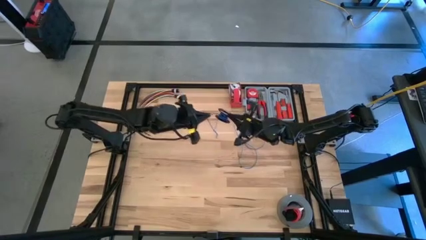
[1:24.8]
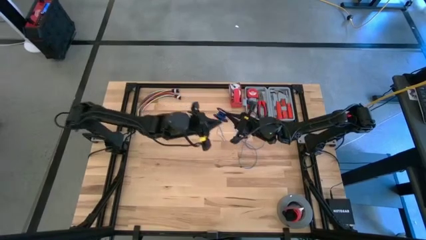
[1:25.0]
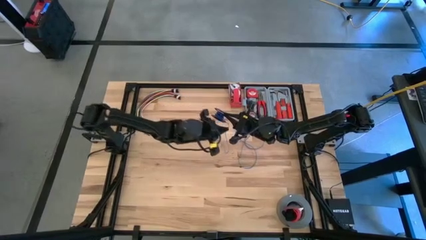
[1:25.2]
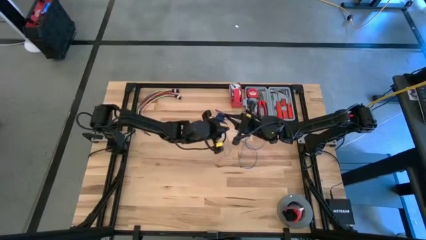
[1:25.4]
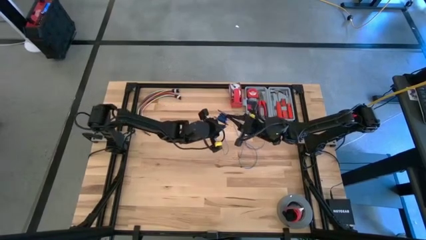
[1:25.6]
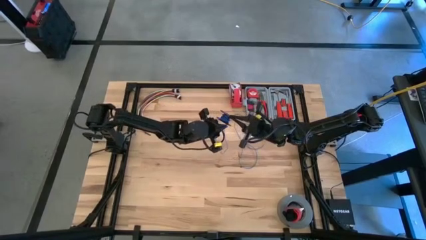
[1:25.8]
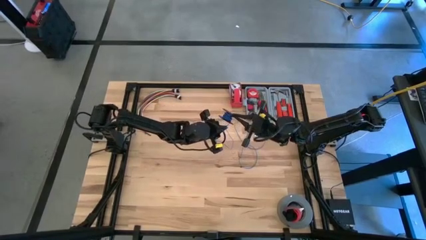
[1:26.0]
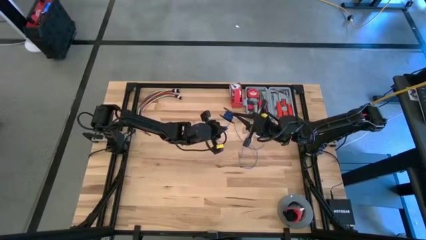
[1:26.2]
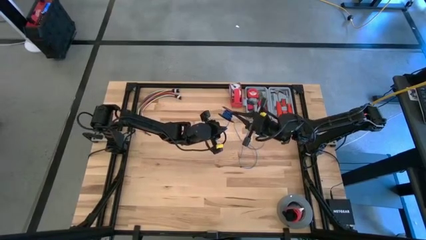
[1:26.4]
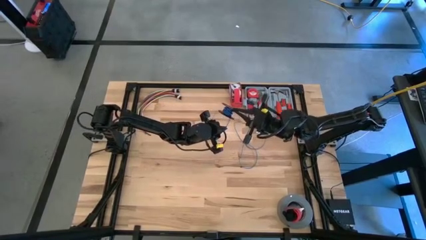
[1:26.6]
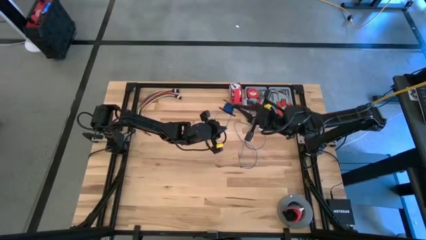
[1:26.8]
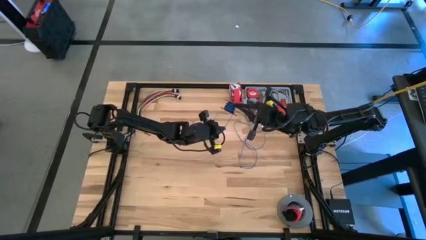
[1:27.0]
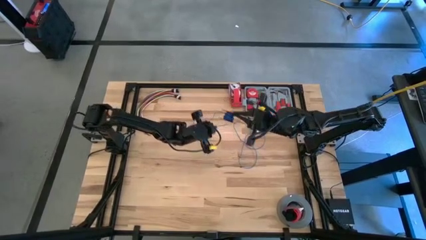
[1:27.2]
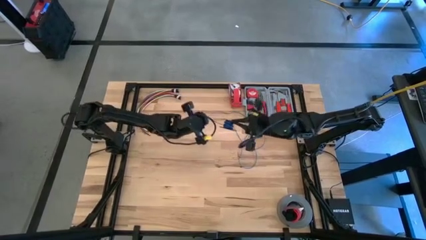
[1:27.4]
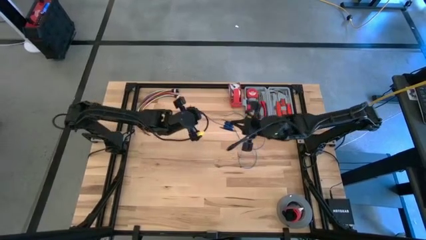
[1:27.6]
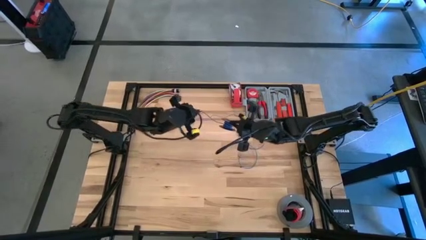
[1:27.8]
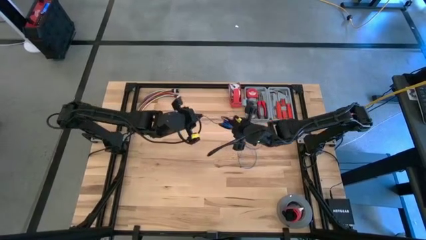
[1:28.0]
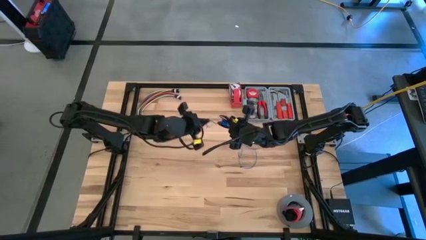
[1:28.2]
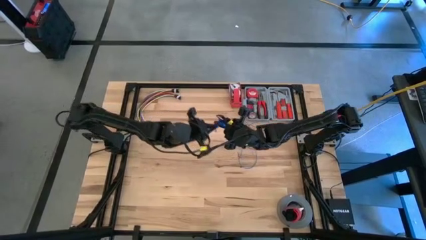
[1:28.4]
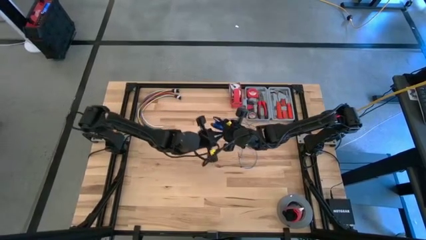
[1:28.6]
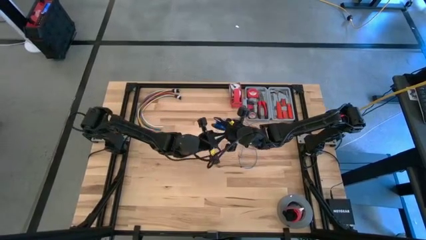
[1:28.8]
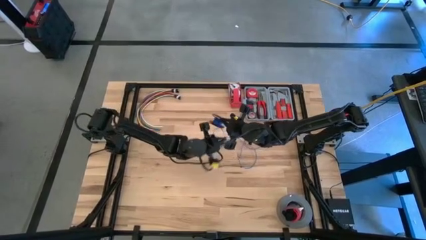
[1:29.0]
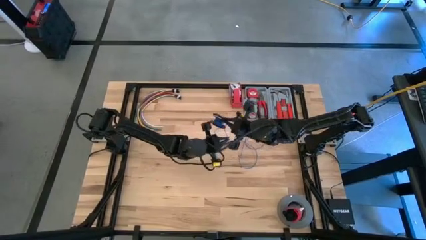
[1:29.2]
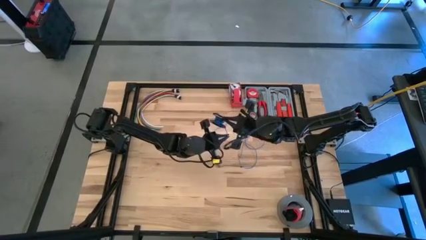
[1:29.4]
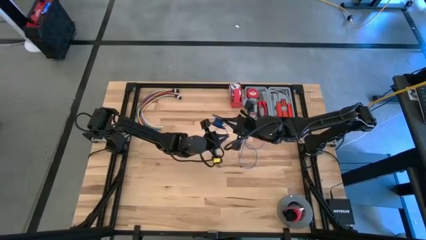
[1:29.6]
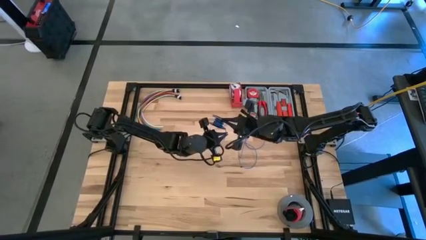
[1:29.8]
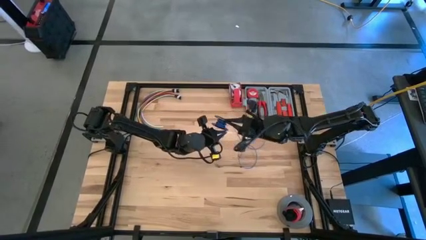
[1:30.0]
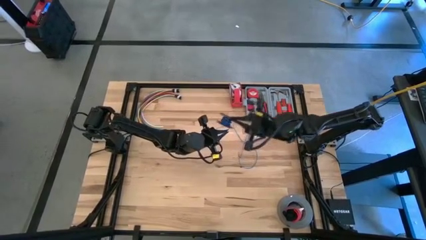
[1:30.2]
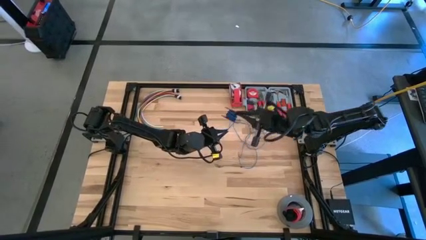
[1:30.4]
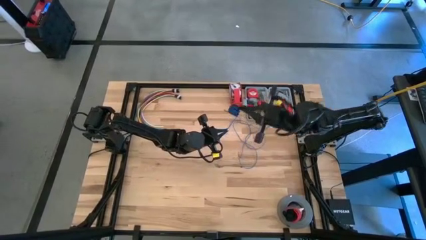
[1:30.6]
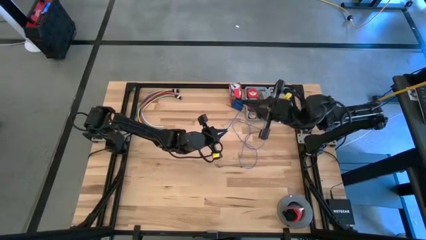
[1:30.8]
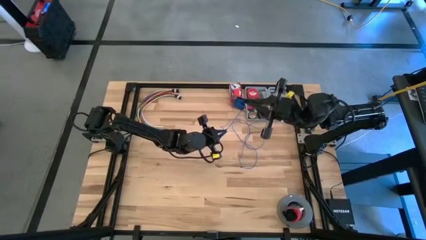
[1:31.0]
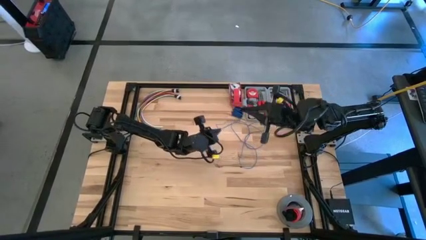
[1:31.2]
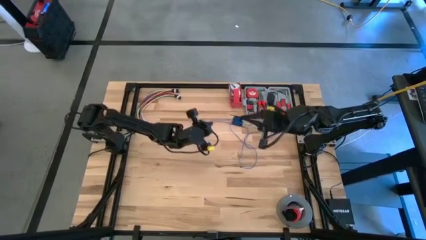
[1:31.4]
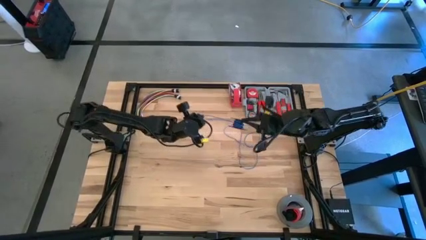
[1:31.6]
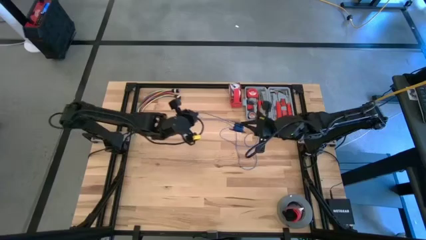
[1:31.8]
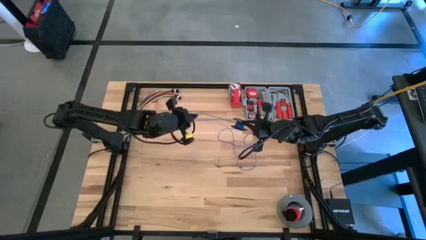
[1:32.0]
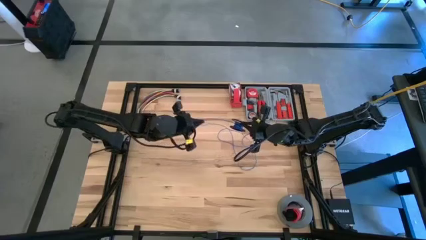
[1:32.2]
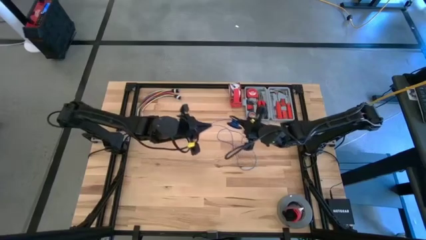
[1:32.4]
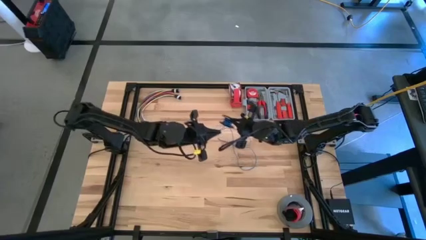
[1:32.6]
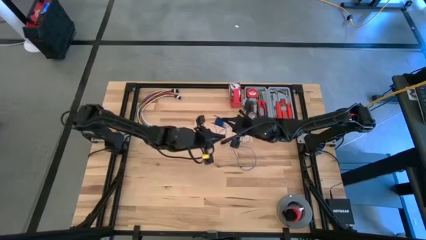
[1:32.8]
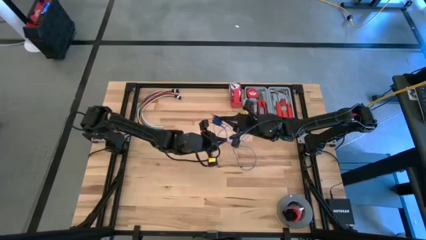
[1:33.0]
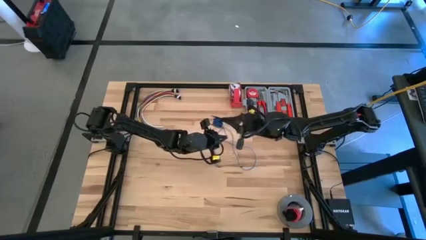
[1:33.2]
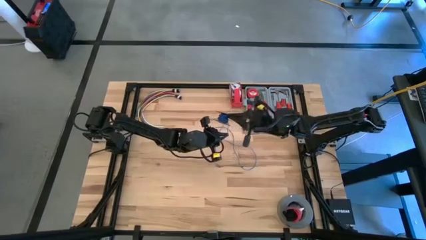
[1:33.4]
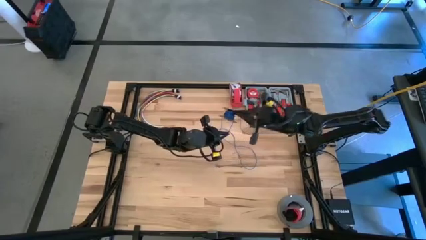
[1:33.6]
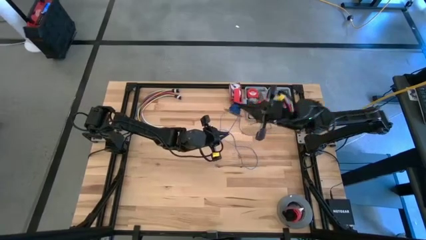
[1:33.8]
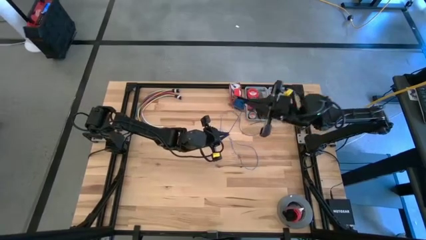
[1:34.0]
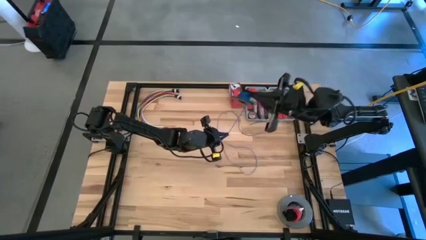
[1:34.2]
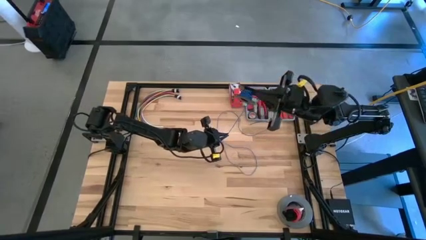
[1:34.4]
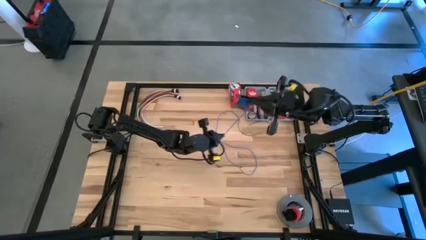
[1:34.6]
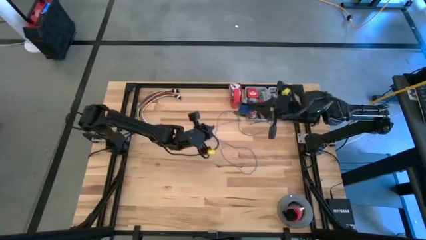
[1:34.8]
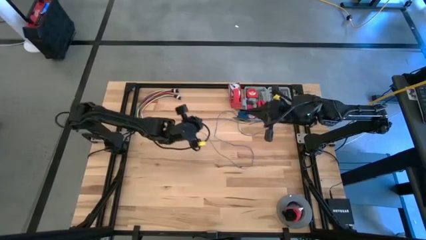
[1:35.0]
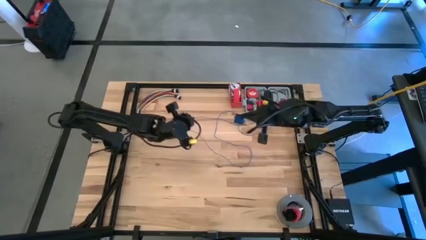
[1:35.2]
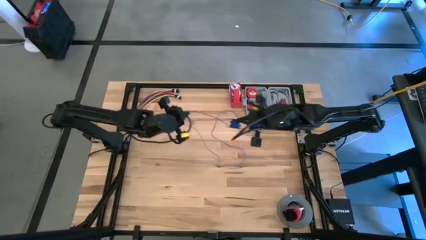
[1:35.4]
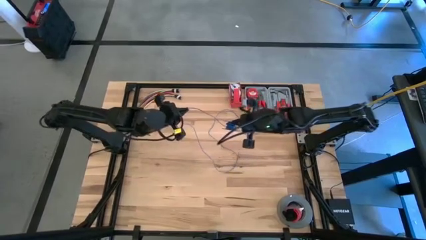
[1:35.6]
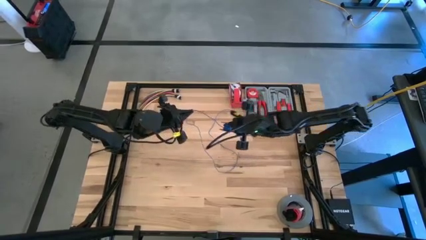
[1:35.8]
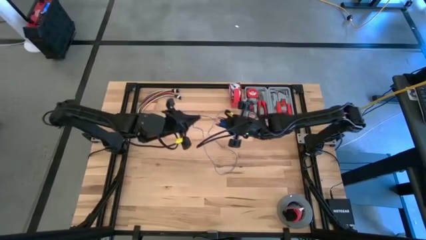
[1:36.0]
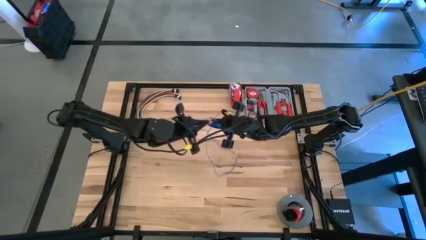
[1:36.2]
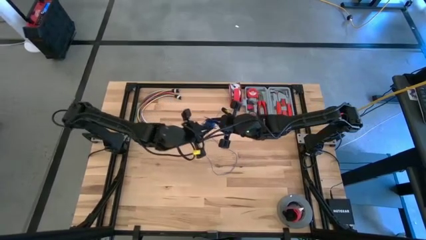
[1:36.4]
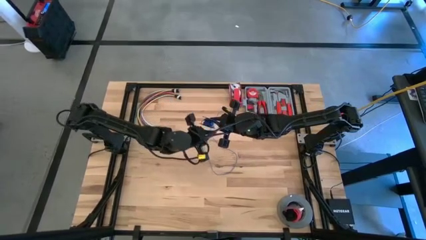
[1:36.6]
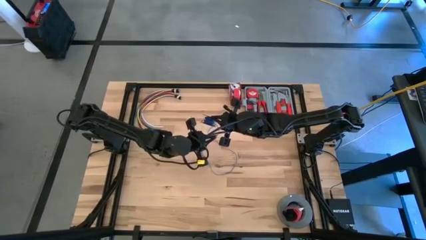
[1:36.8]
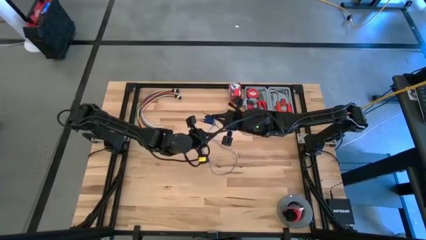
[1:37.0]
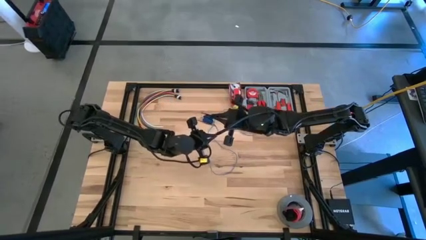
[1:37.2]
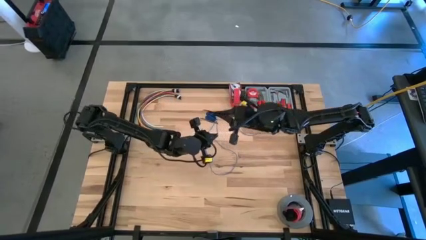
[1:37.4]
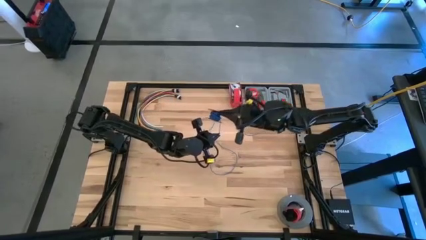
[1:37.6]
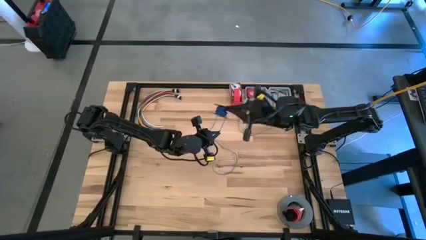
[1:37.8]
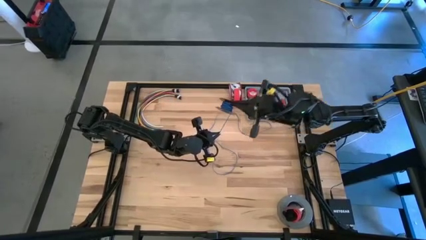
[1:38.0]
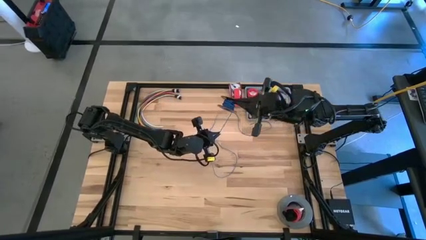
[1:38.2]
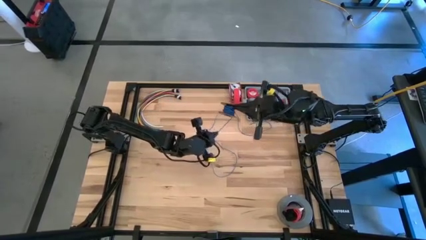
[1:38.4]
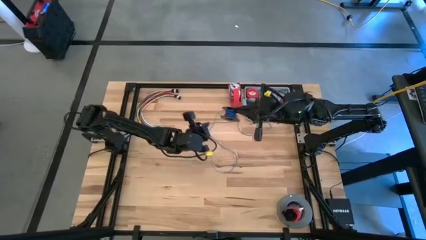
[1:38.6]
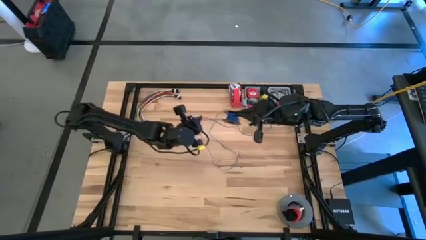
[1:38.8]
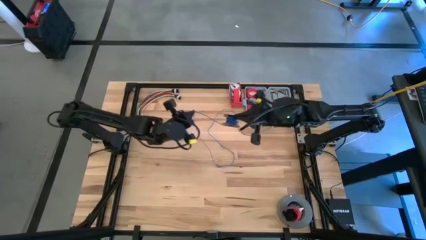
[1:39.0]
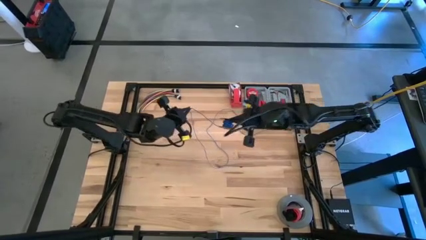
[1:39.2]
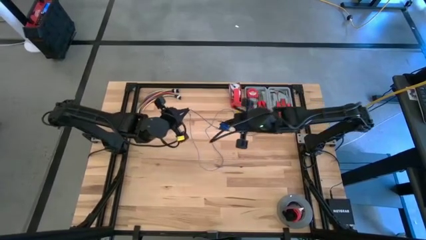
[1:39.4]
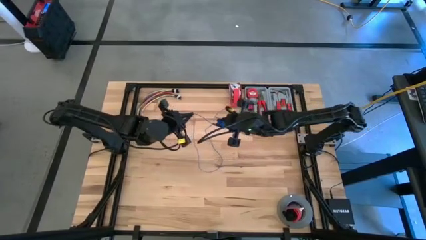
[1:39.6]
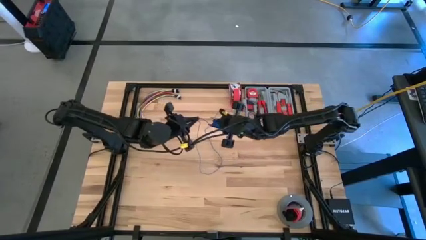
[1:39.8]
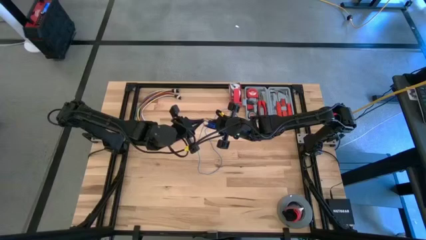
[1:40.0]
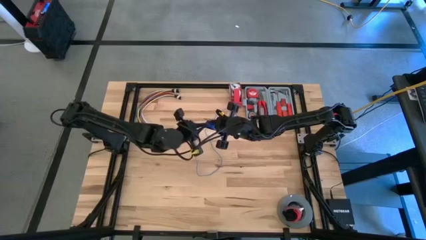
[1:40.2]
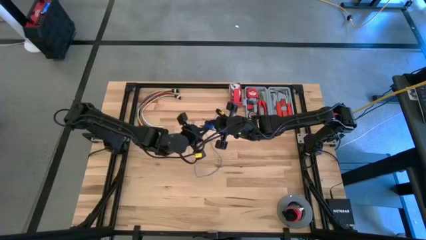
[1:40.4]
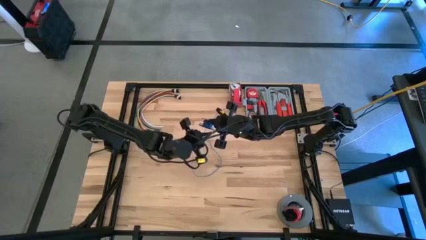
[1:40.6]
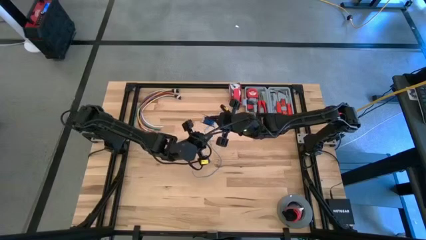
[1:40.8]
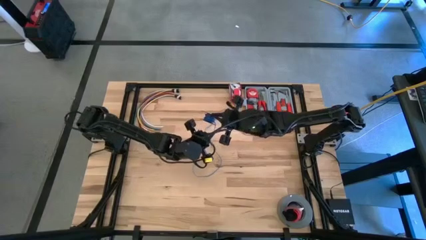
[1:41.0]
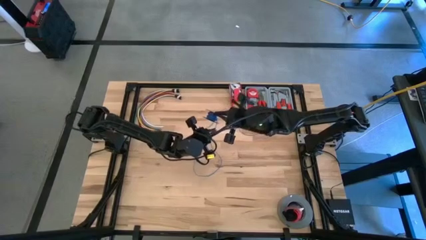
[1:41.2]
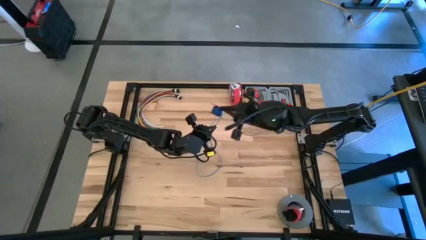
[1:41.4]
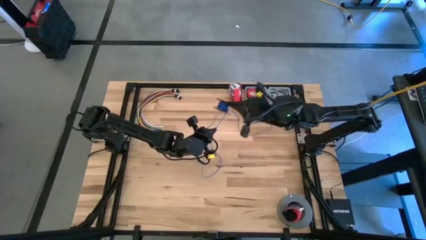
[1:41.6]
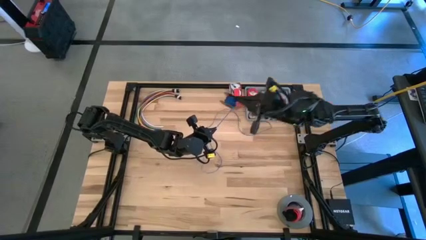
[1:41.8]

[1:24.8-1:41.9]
Task: Coil cords
Coil the blue wire on the black spool
